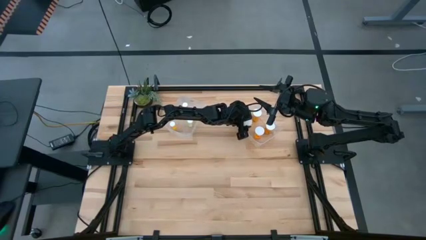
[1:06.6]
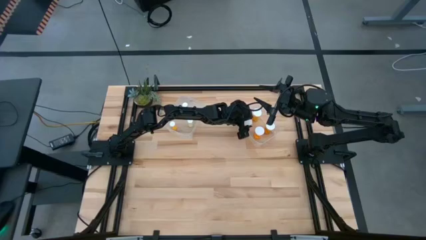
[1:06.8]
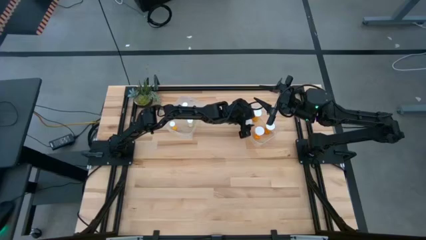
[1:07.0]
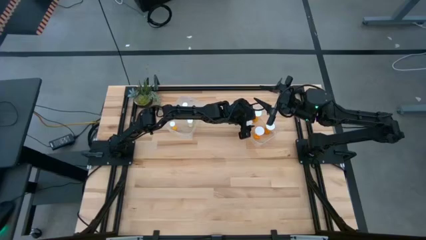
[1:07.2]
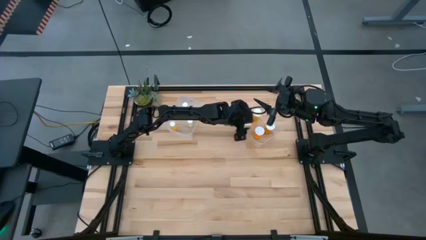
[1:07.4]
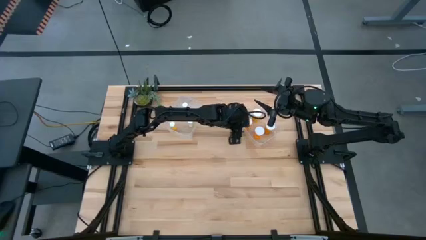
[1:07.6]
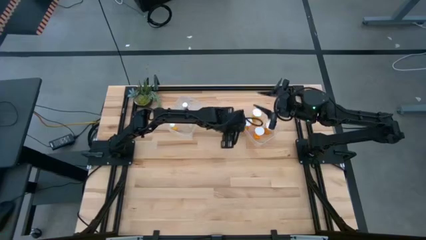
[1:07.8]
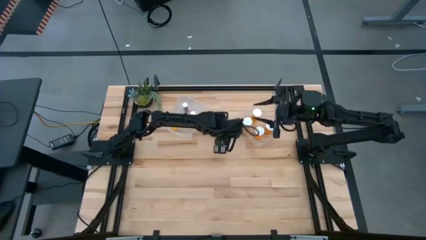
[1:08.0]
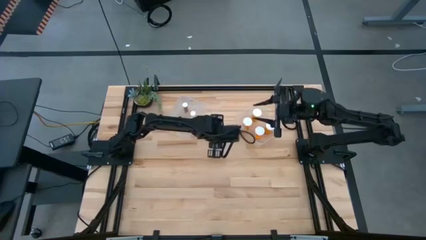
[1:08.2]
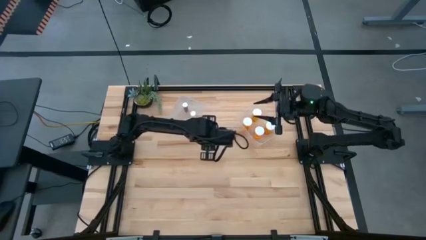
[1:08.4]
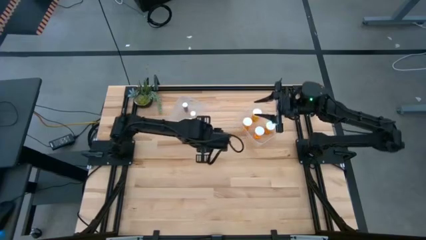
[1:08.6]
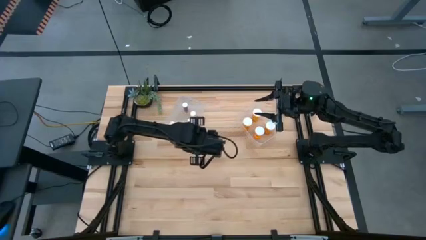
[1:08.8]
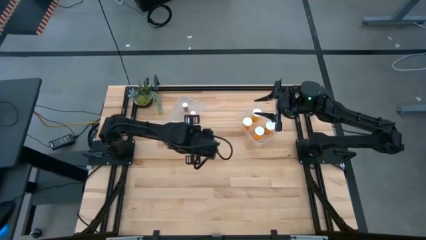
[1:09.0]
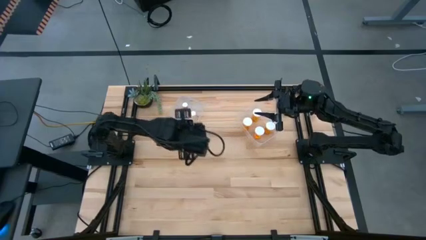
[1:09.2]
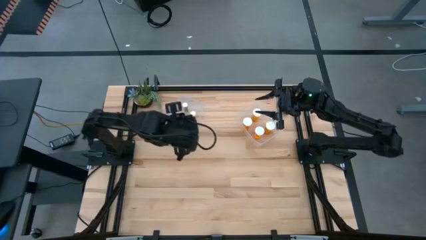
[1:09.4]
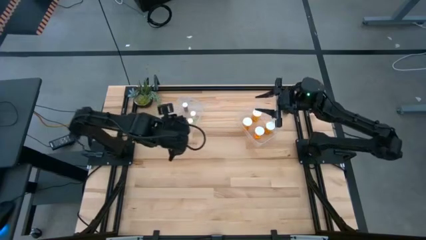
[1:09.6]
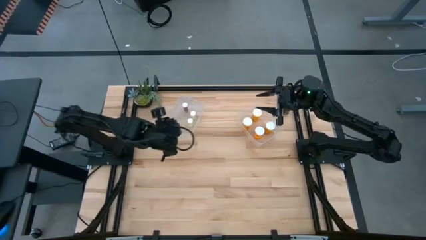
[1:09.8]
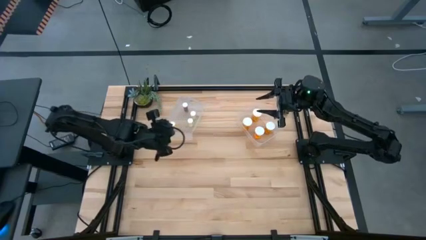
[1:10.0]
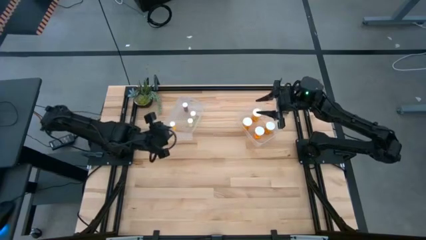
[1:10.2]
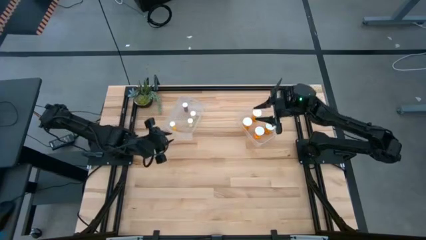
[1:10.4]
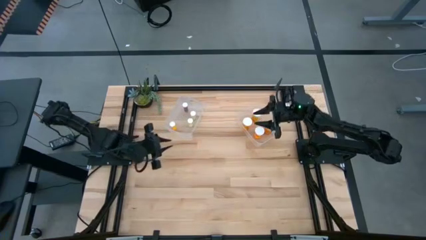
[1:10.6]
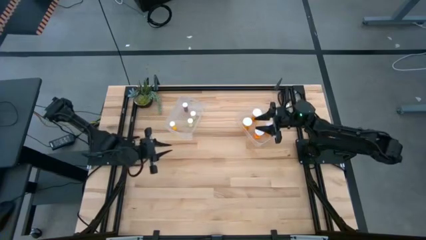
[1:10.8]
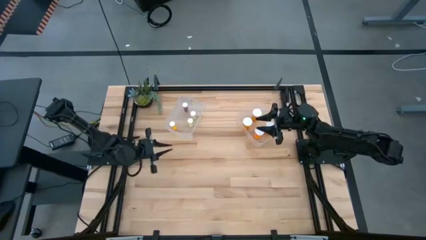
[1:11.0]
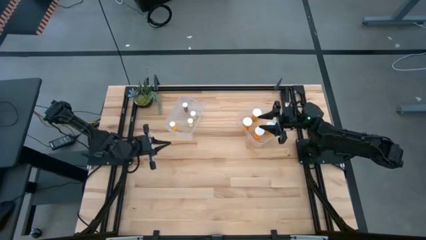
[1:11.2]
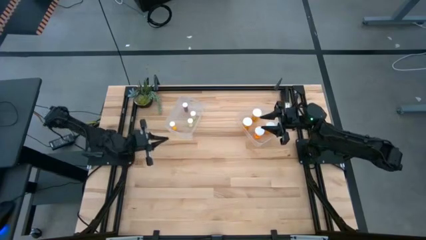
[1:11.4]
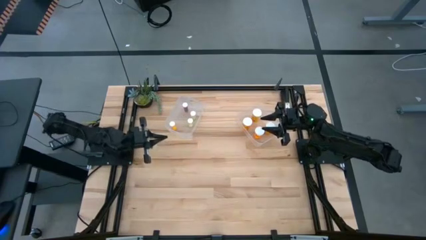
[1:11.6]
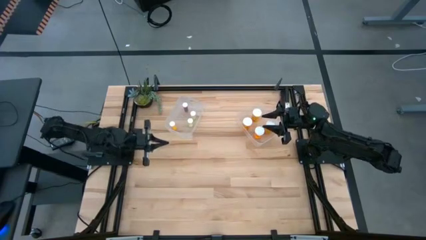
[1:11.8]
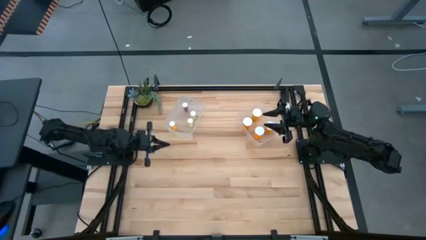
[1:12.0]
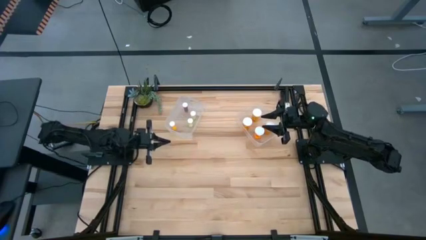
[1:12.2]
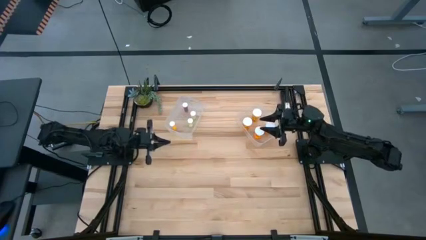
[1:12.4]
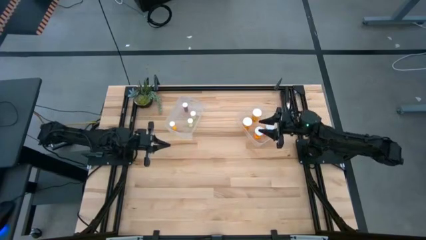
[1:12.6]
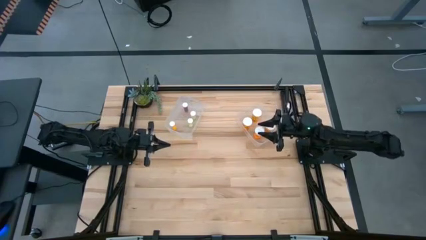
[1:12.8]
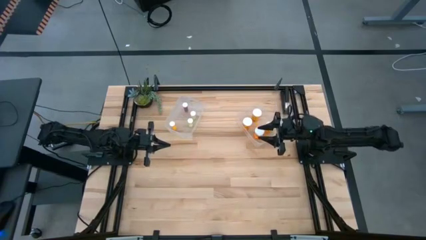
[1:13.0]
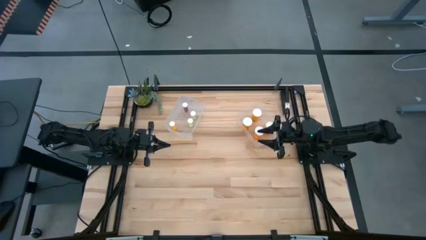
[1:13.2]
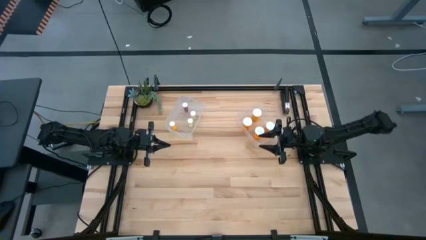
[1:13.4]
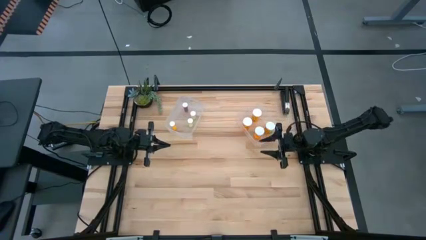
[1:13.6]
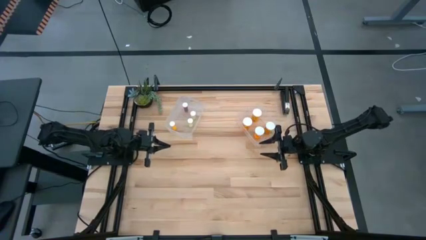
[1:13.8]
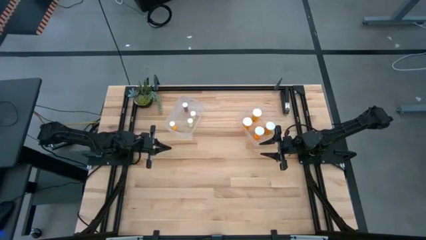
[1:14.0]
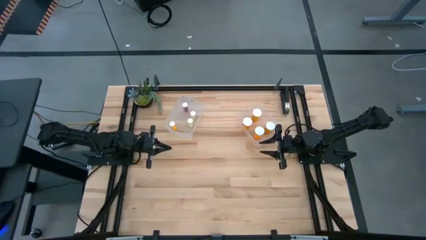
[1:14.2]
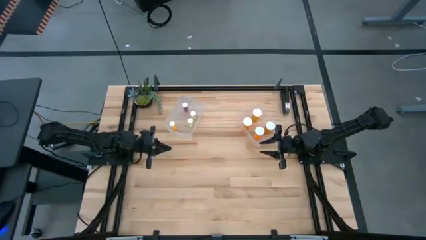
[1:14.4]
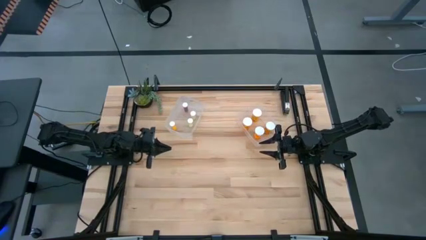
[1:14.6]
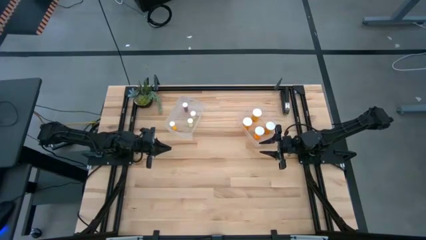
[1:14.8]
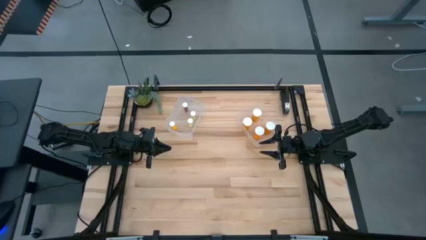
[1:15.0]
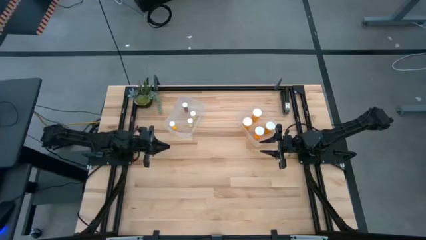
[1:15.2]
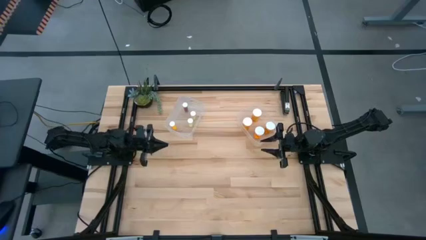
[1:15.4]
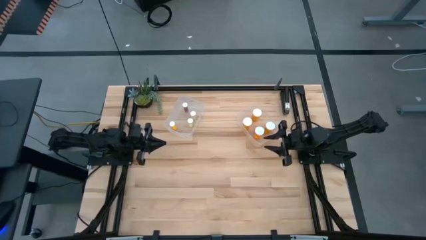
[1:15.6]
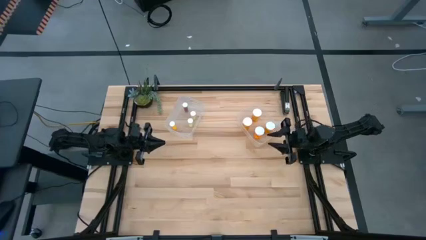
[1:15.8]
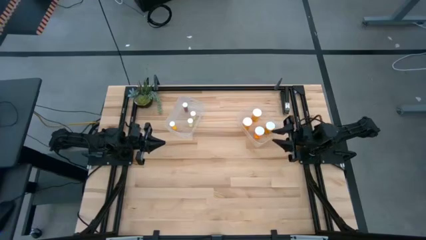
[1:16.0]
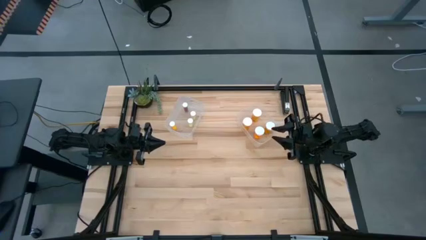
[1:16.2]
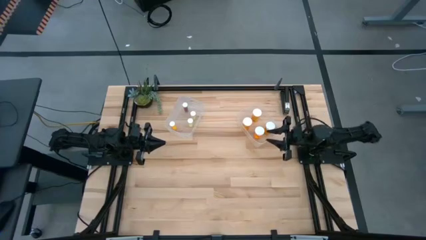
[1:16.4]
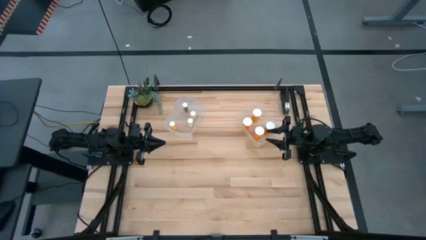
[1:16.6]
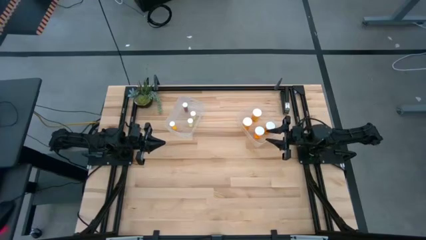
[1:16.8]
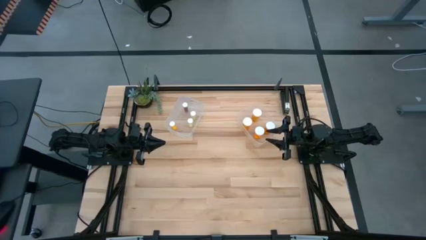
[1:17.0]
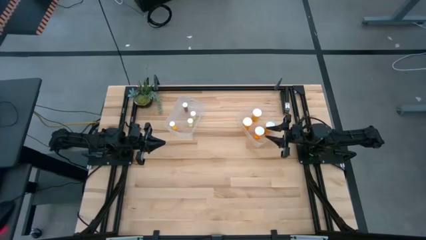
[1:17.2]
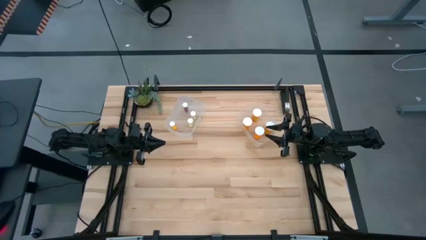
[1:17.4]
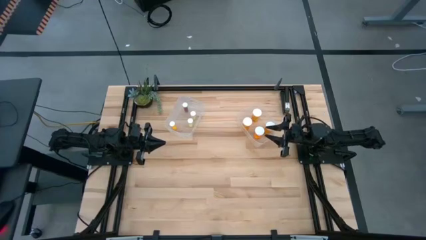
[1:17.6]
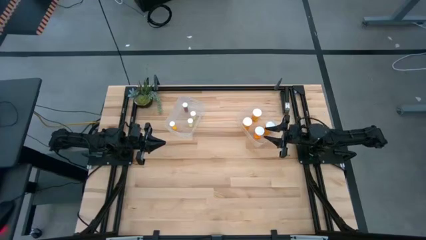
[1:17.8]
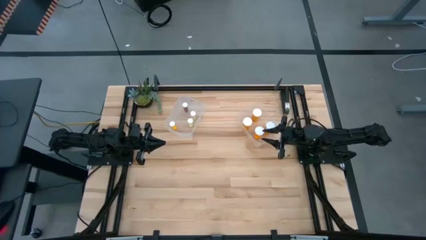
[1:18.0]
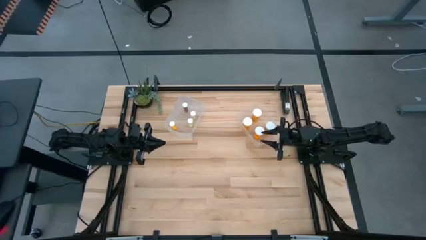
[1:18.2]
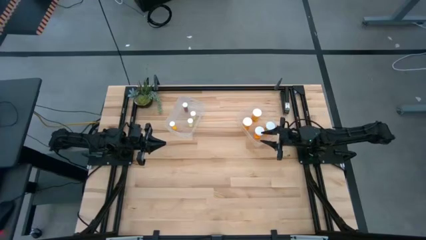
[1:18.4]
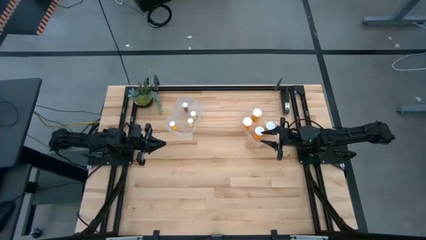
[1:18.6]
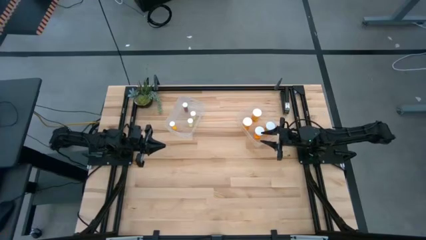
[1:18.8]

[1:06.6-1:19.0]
Task: Pick and place medicine bottles into bin by pill shape (circle, oval)
Return to Home Position

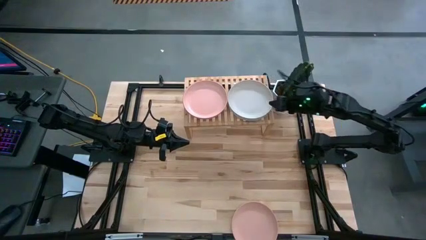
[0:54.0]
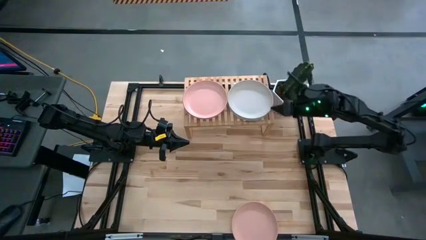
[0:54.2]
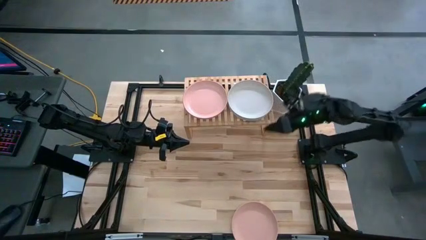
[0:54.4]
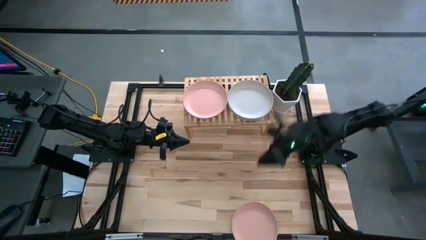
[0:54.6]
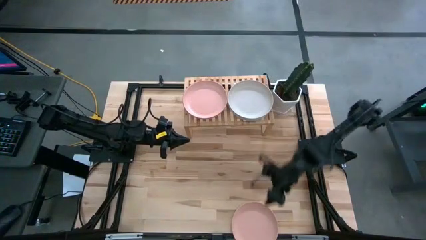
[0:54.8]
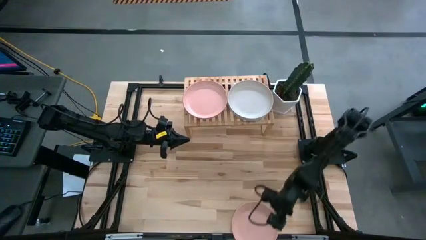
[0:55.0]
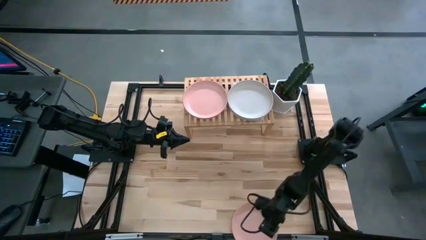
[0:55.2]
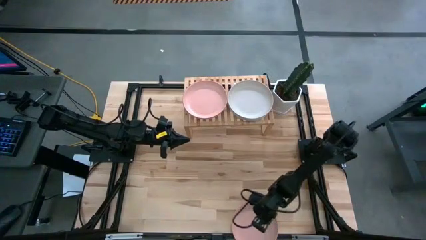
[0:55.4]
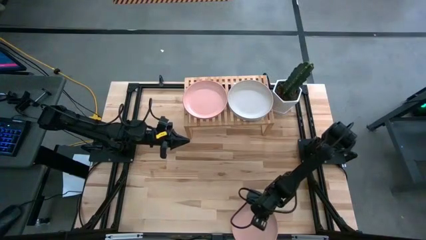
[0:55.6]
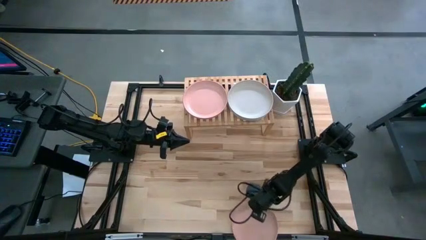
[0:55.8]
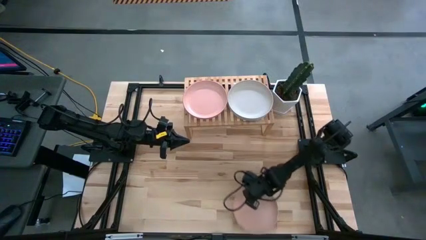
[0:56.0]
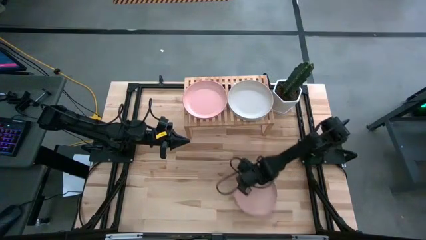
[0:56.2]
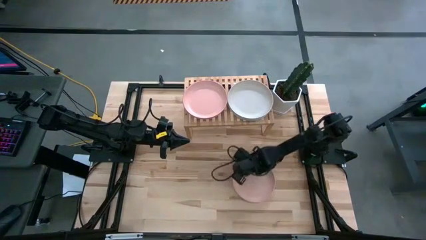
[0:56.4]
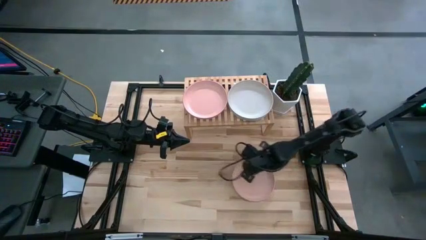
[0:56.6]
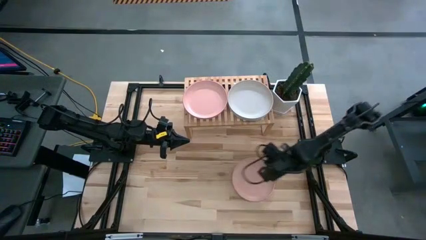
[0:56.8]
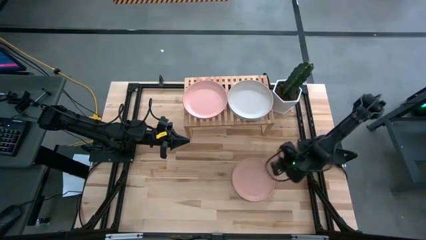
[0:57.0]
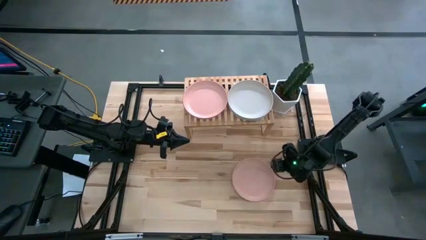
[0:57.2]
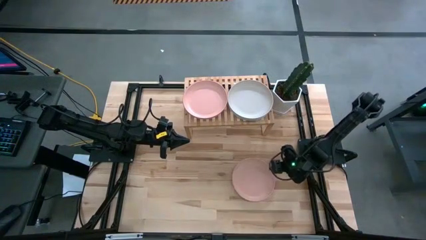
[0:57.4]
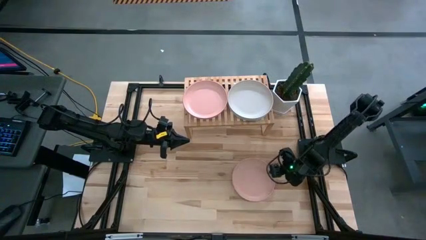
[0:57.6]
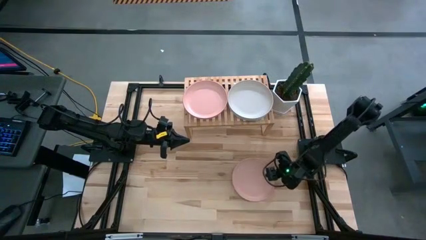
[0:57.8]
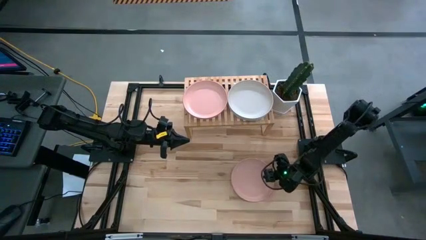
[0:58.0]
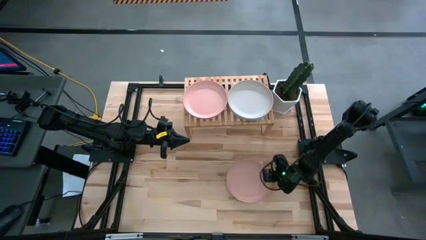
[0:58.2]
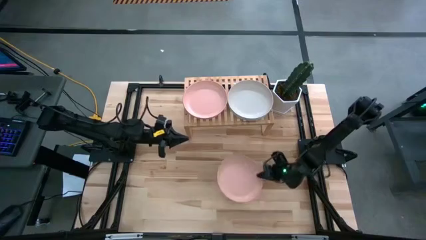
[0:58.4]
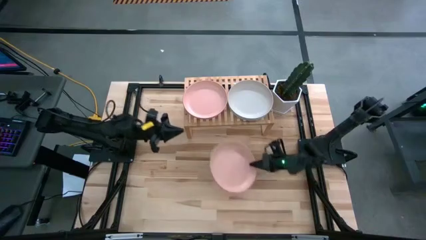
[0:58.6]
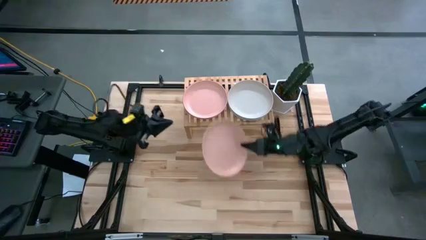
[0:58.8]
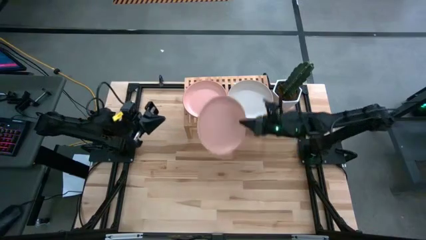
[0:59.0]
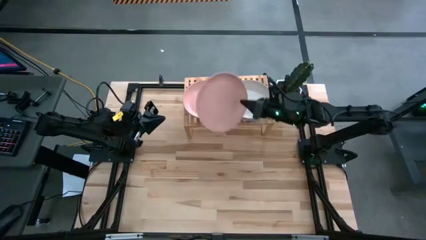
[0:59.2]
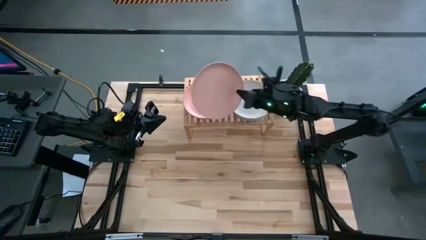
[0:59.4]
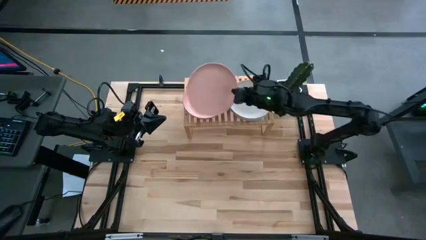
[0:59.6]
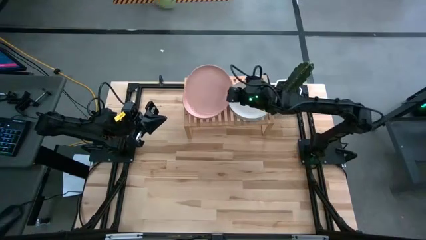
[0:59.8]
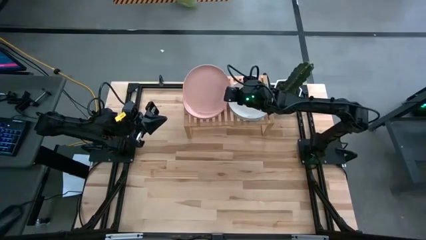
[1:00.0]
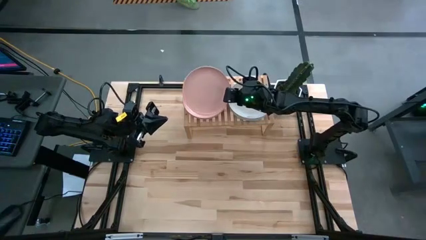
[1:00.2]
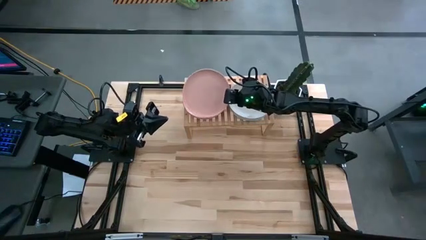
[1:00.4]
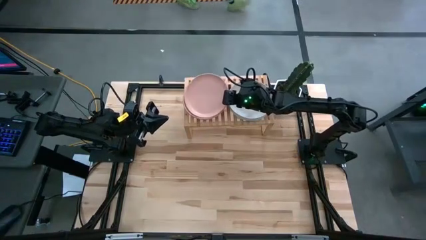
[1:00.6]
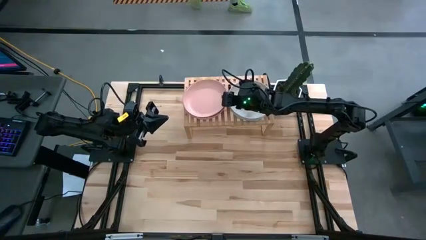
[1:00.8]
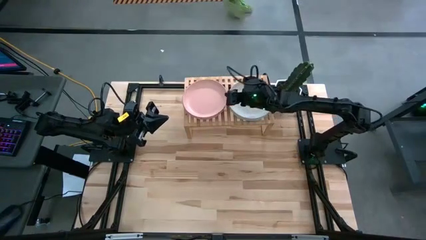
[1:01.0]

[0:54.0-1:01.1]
Task: Place and stack plates onto a shelf
Stack the pink plate on top of the other pink plate on the shelf
